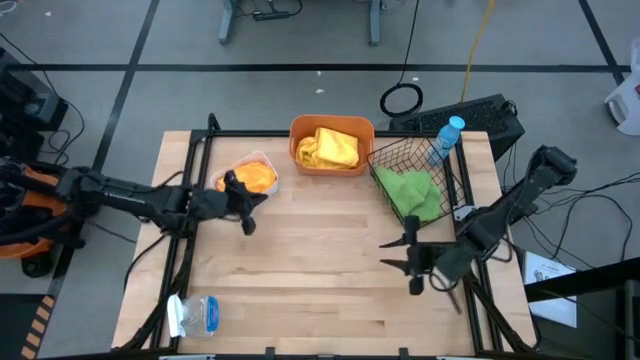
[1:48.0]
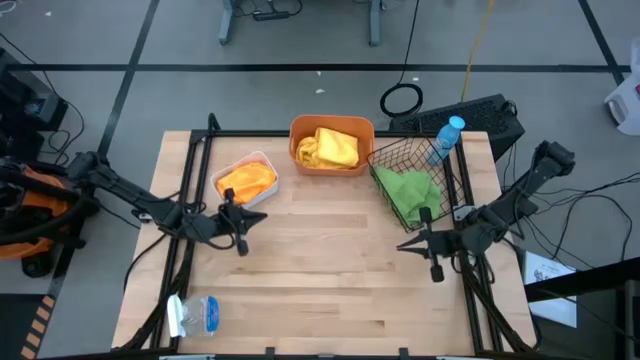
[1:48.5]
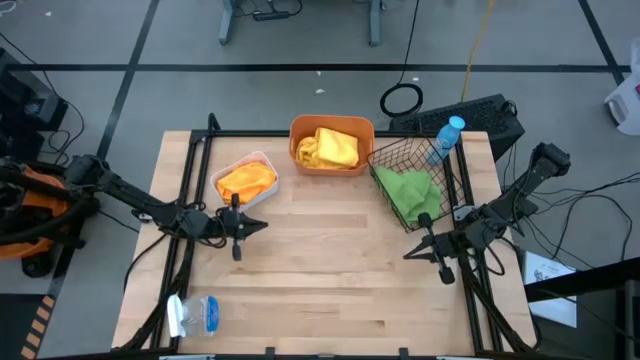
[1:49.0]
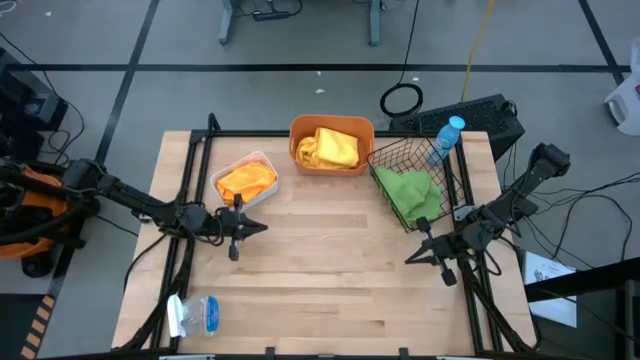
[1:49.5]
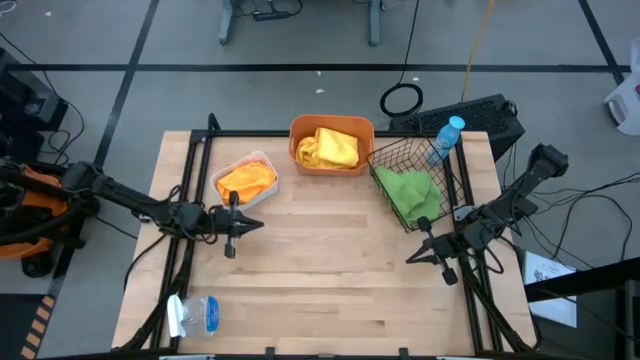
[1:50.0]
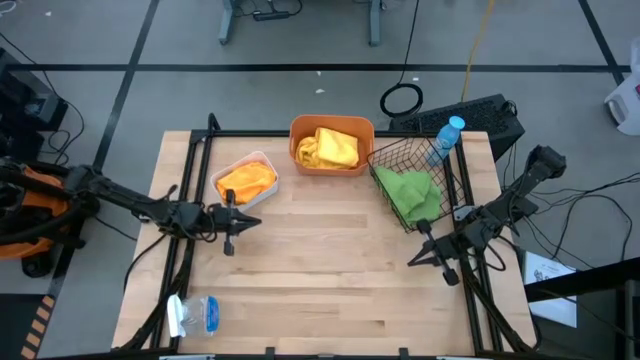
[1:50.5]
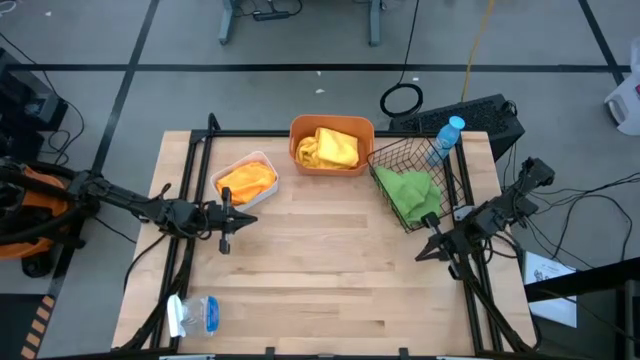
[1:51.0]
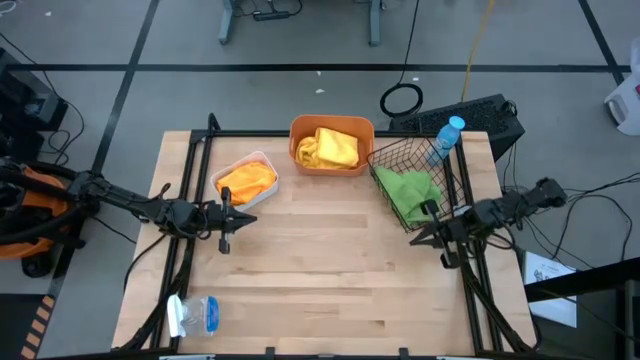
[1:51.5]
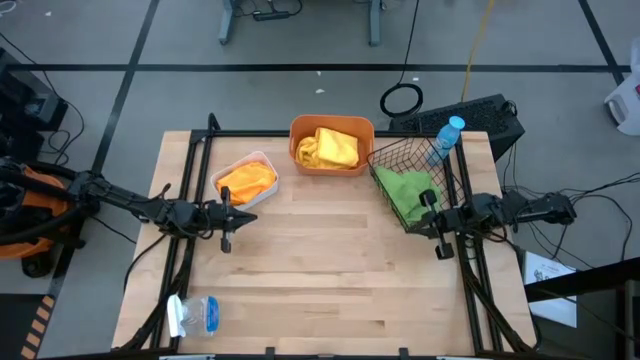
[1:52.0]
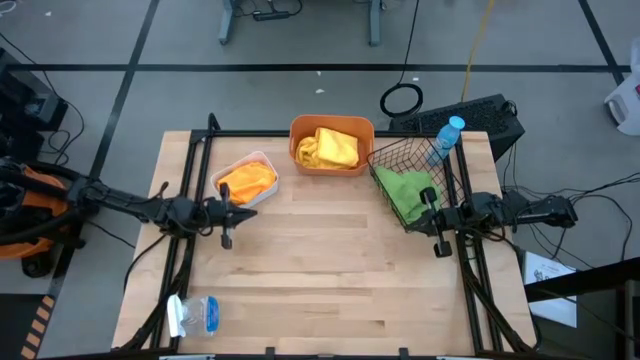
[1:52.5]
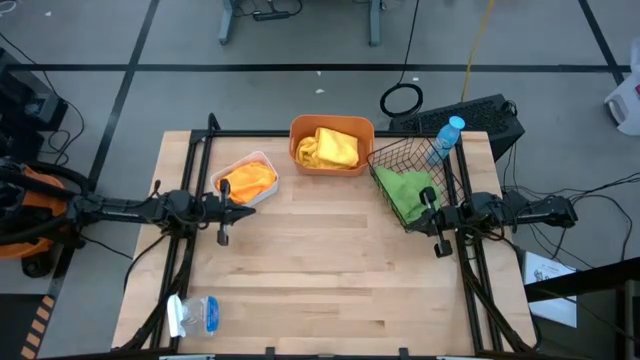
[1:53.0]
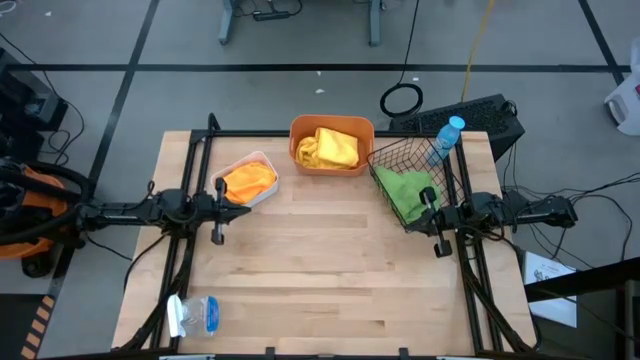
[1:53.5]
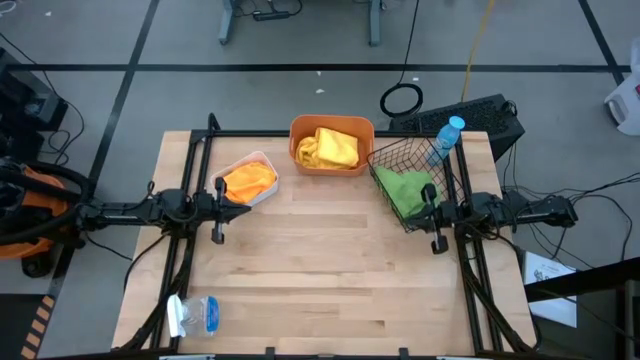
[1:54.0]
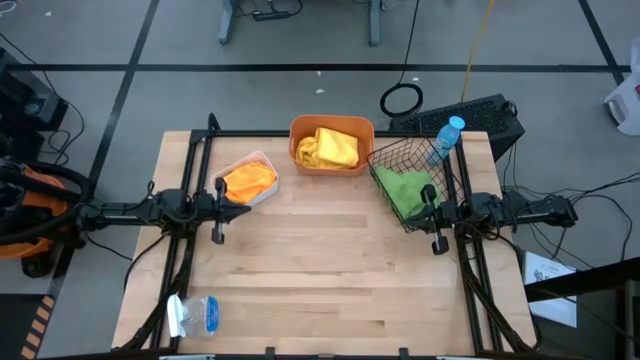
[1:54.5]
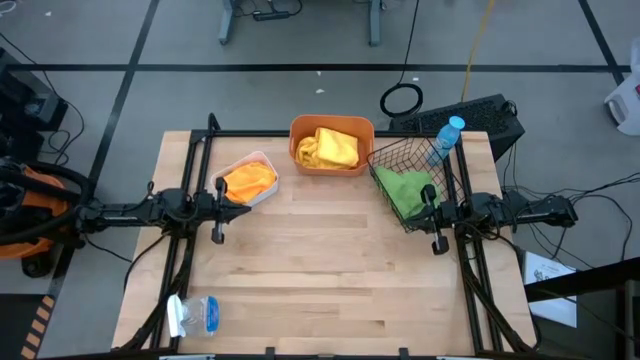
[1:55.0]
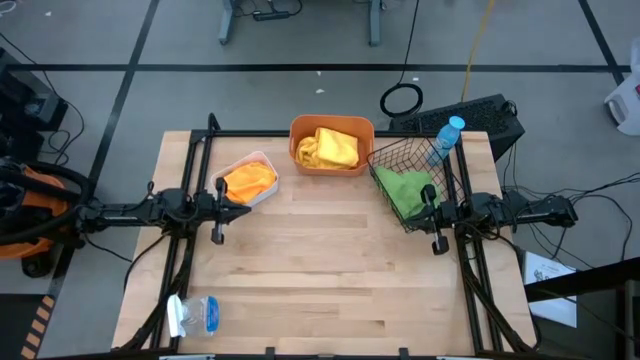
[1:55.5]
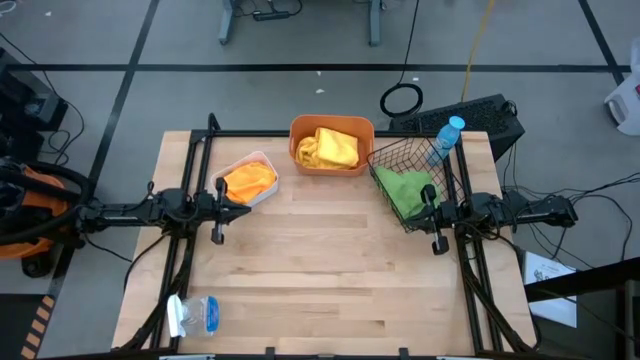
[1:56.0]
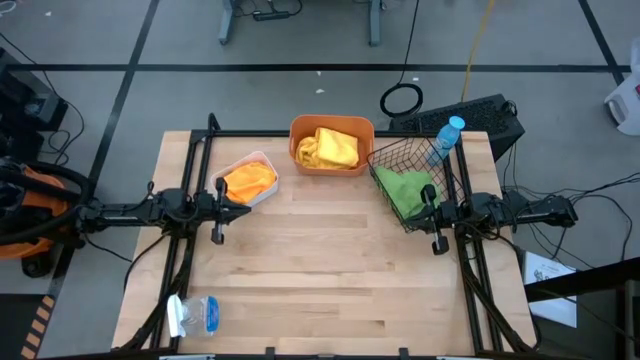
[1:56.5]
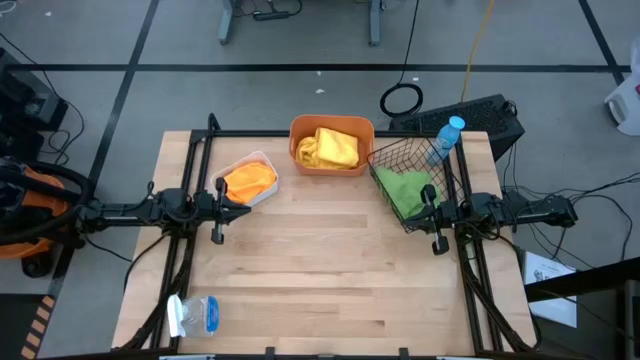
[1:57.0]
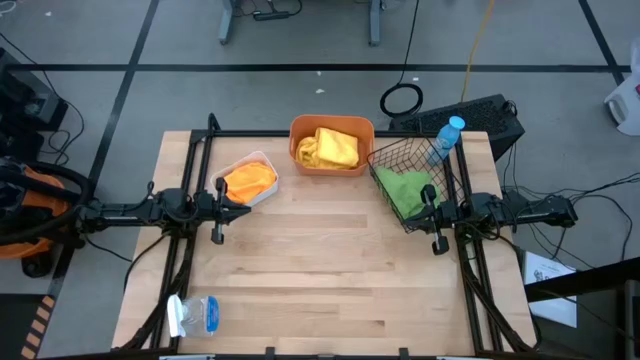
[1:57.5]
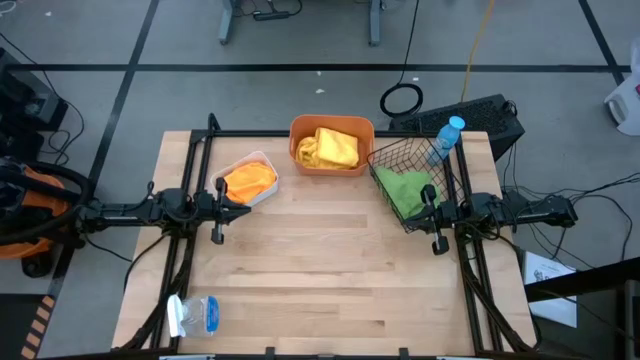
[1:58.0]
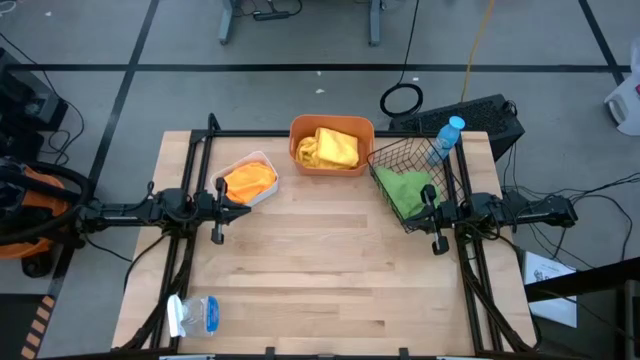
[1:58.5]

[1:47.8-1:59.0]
Task: Sort microfiber towel by color & place in baskets
Return to Home Position

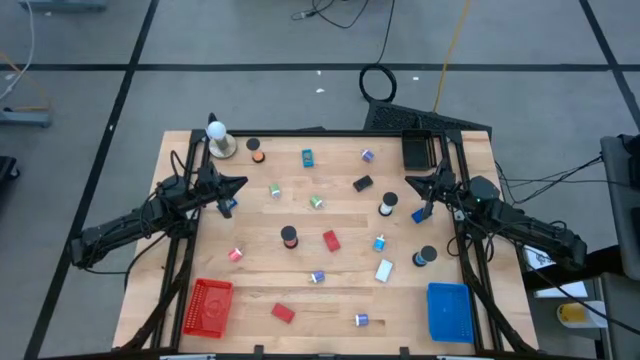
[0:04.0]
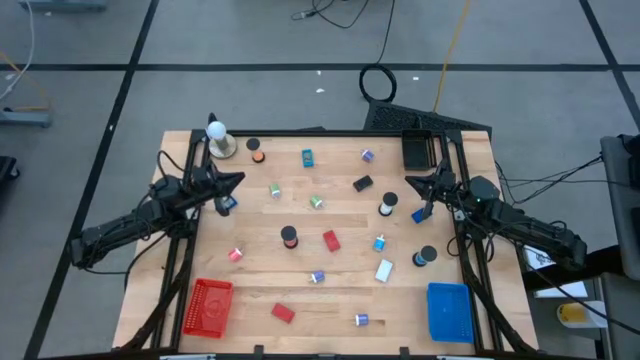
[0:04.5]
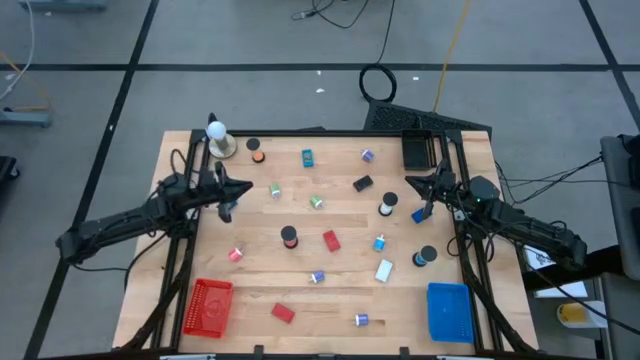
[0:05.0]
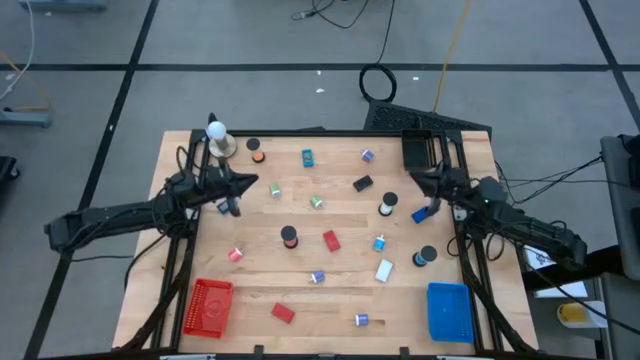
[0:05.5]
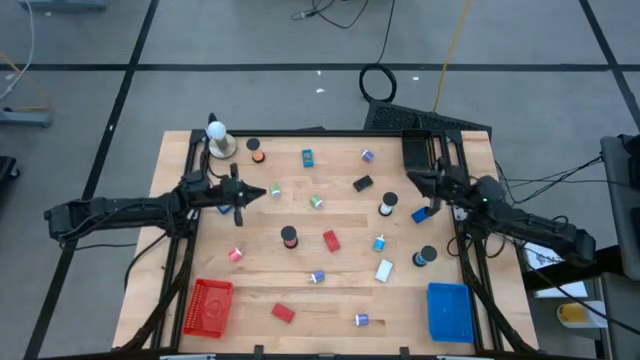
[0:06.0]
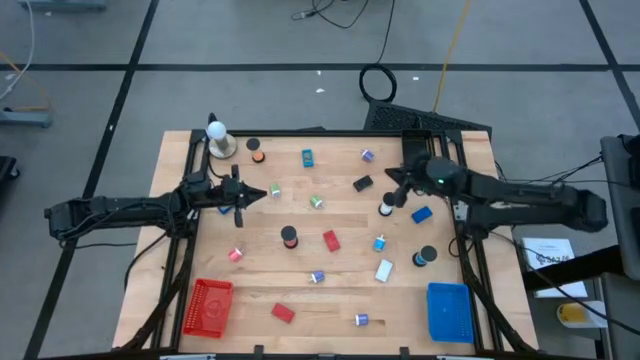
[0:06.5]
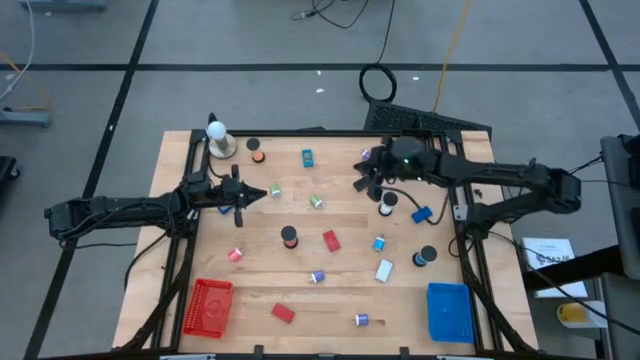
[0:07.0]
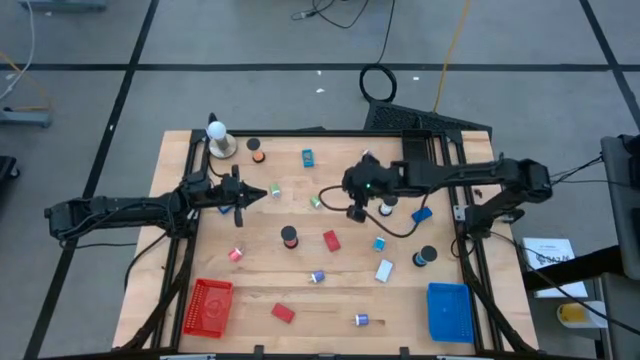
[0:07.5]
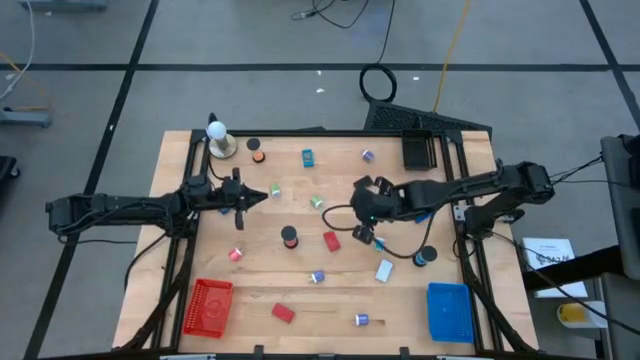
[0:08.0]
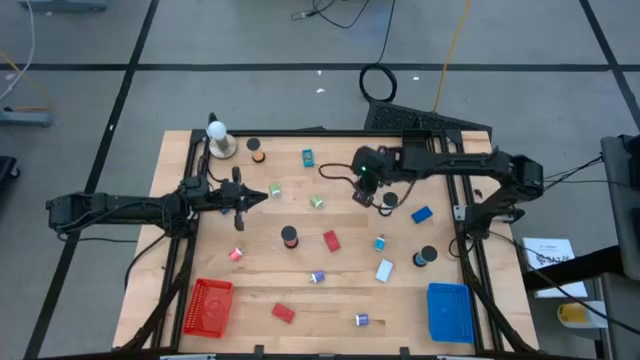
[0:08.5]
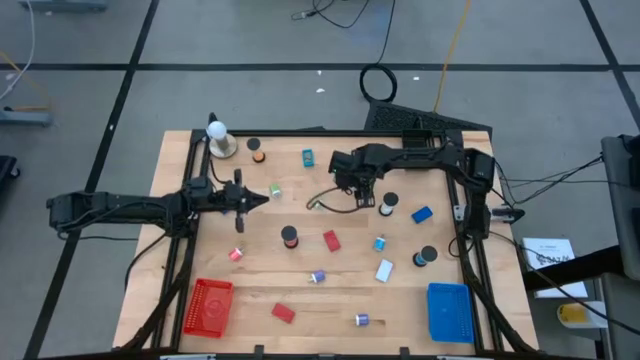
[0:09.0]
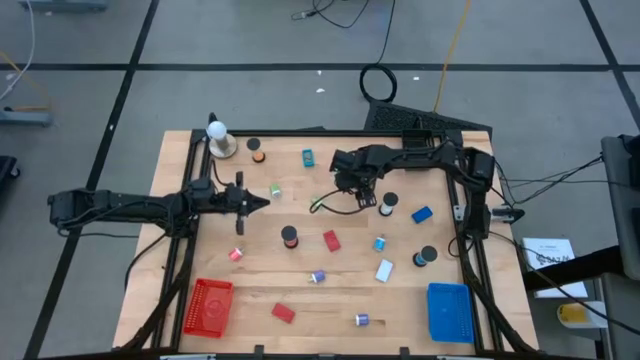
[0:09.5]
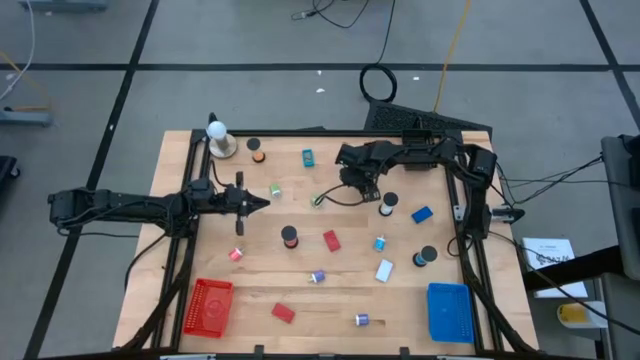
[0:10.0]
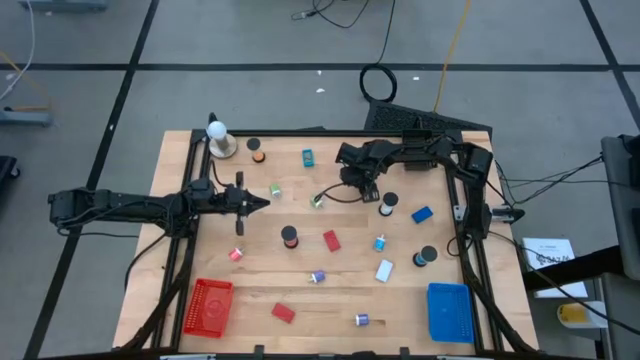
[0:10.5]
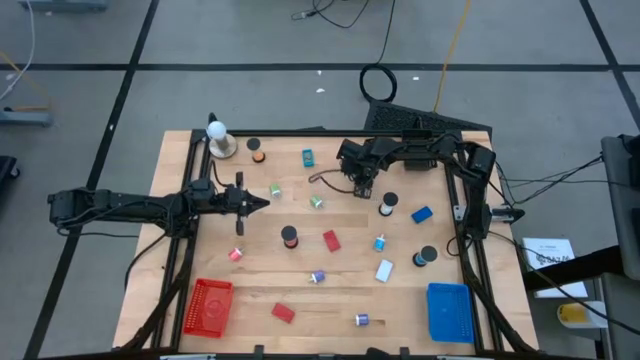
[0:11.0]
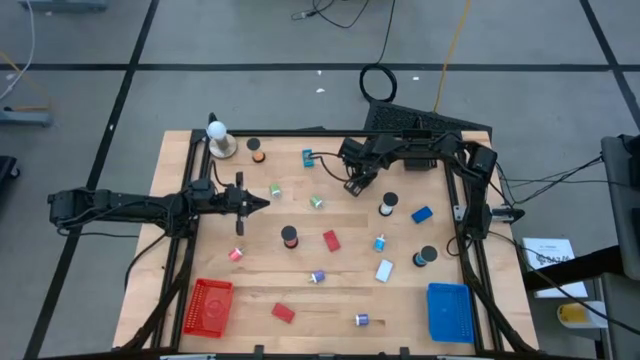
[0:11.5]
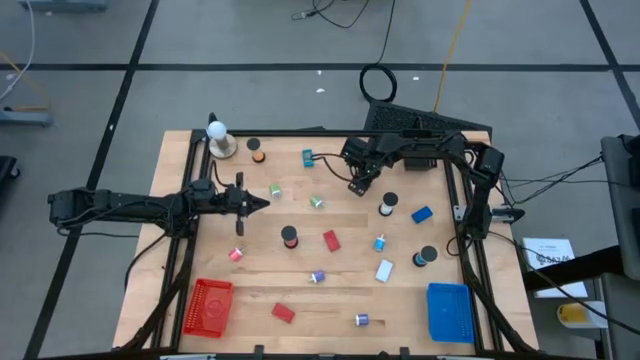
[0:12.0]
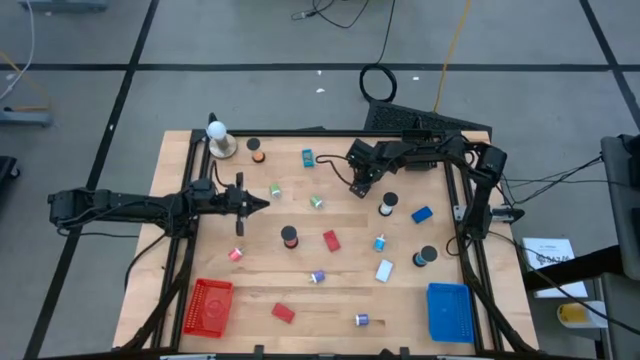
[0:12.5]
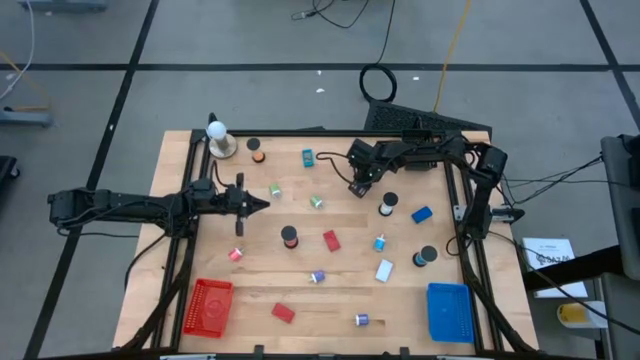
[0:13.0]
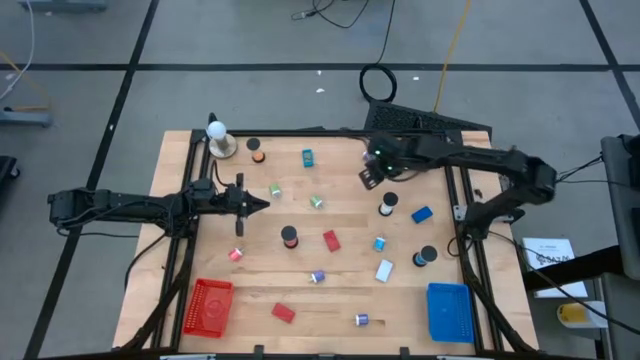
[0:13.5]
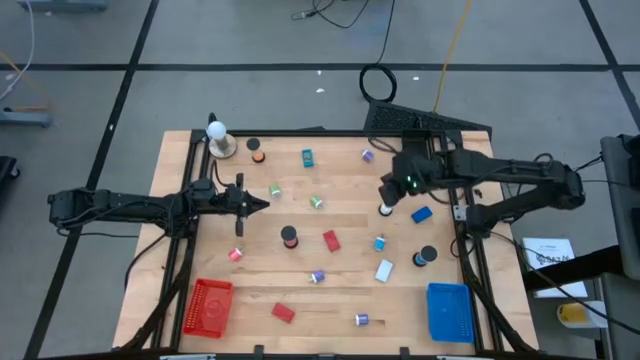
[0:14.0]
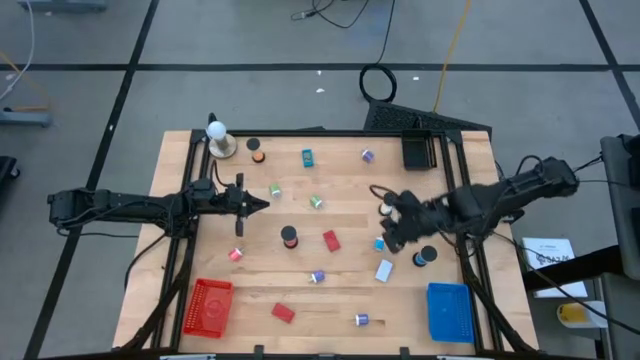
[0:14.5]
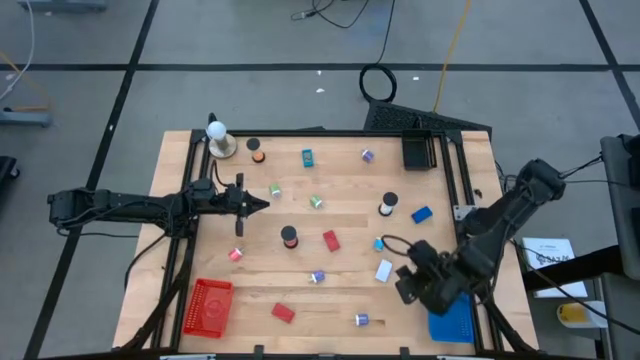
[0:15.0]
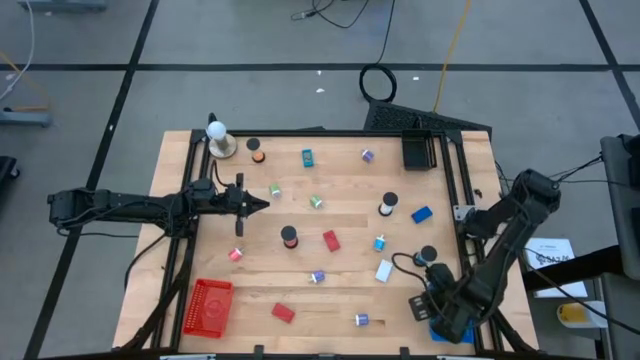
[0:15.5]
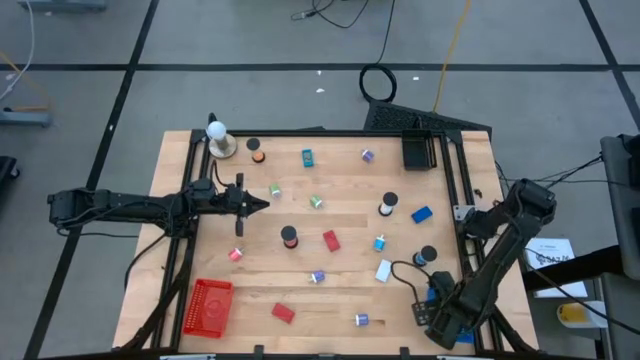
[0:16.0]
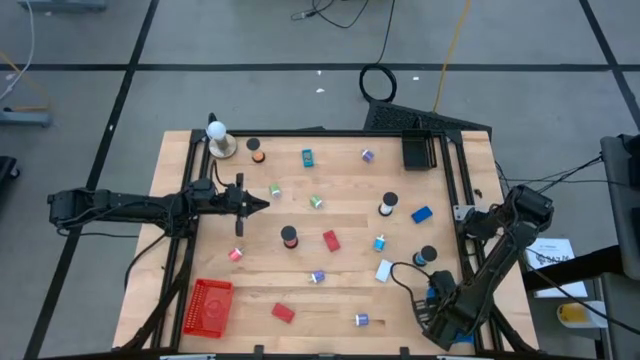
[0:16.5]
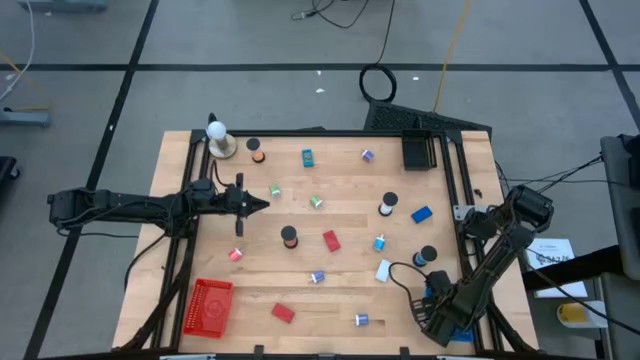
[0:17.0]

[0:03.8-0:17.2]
Task: Pick & Place Office items
Put the black digital clock into the blue bin
